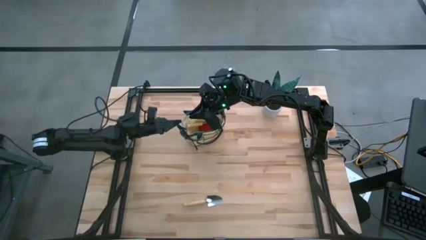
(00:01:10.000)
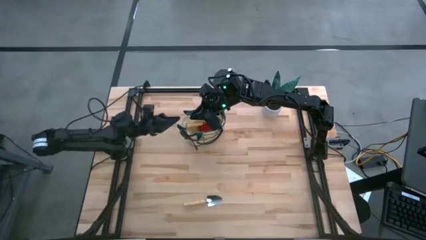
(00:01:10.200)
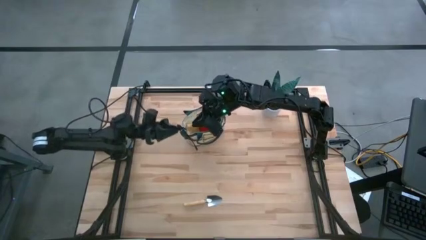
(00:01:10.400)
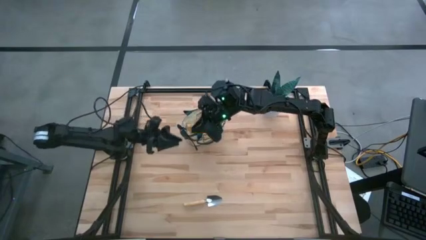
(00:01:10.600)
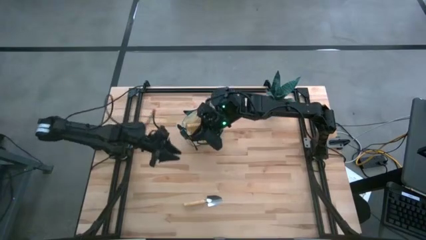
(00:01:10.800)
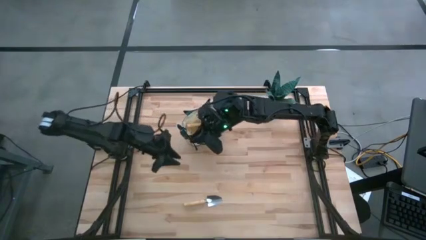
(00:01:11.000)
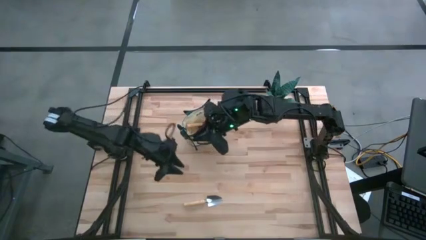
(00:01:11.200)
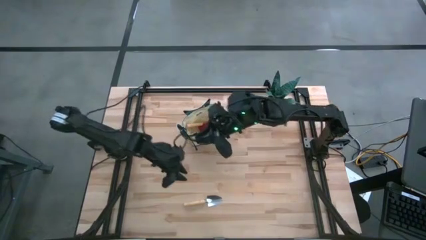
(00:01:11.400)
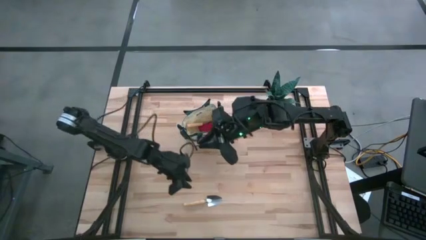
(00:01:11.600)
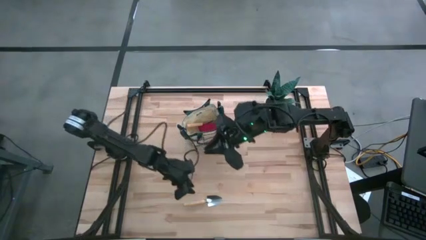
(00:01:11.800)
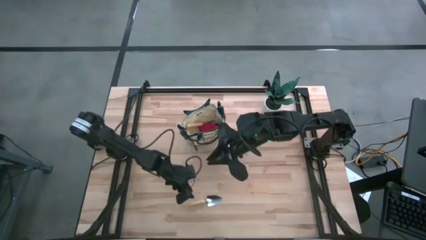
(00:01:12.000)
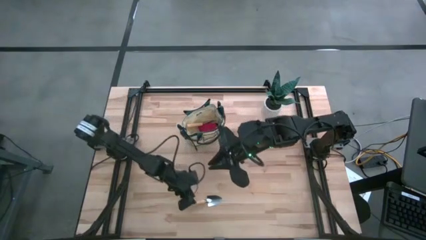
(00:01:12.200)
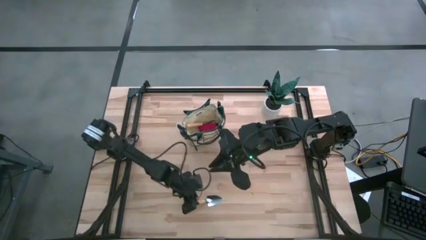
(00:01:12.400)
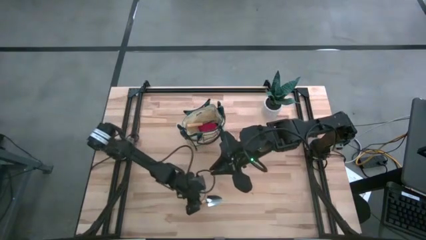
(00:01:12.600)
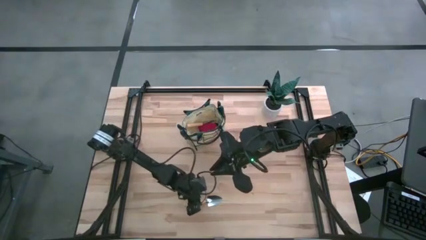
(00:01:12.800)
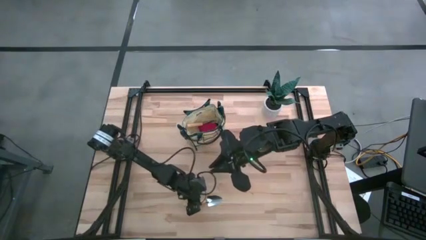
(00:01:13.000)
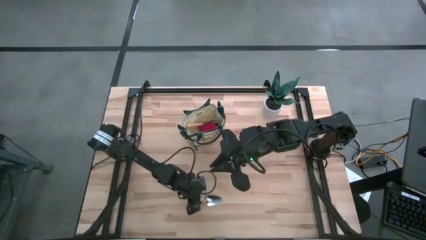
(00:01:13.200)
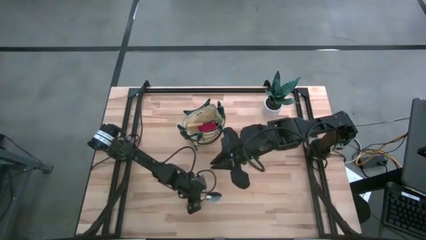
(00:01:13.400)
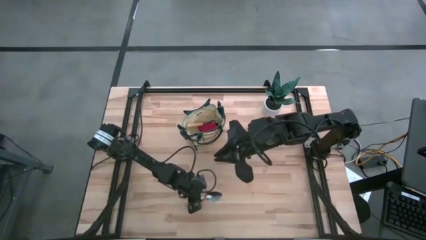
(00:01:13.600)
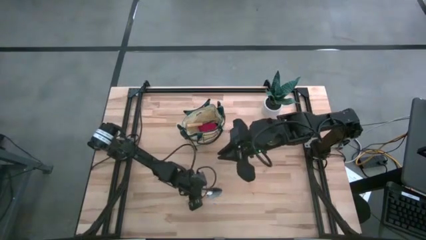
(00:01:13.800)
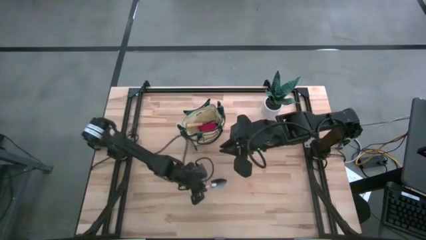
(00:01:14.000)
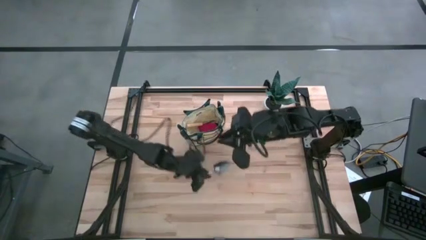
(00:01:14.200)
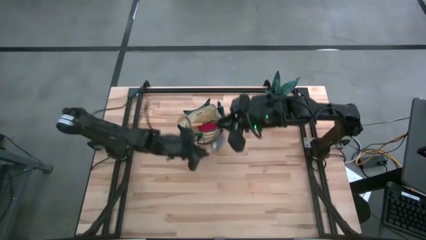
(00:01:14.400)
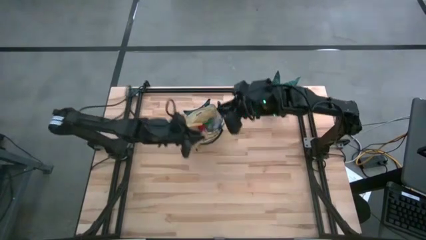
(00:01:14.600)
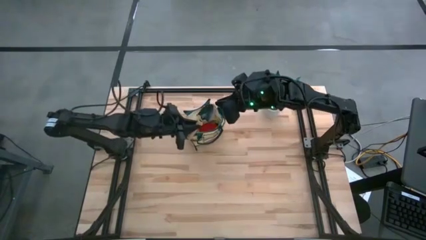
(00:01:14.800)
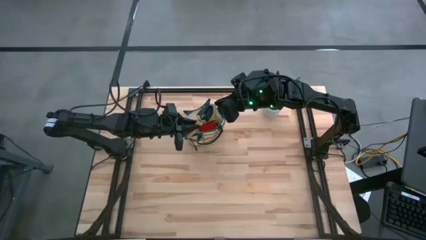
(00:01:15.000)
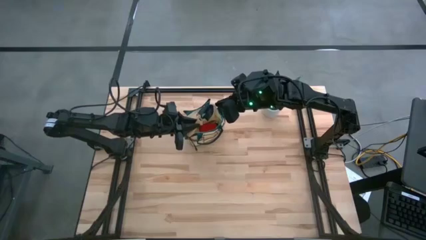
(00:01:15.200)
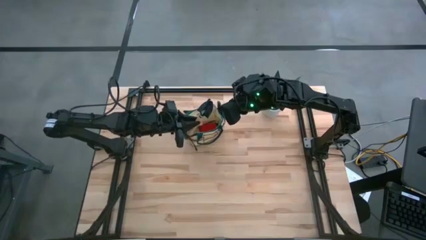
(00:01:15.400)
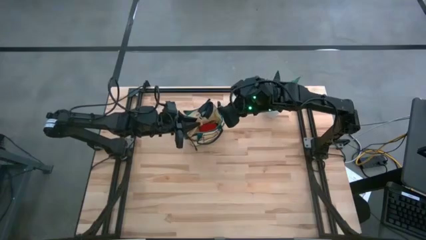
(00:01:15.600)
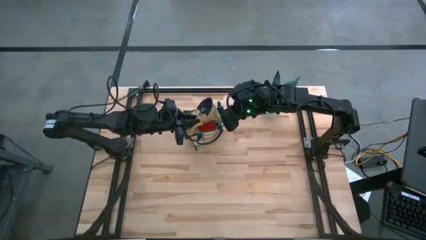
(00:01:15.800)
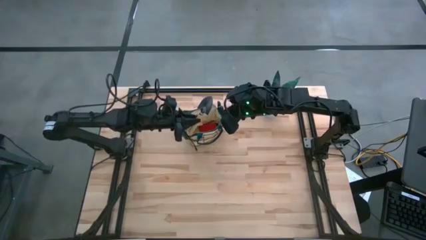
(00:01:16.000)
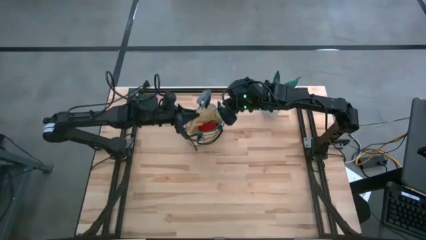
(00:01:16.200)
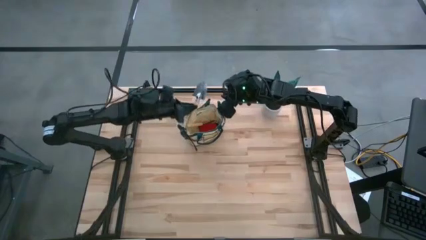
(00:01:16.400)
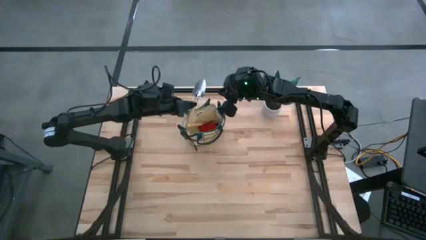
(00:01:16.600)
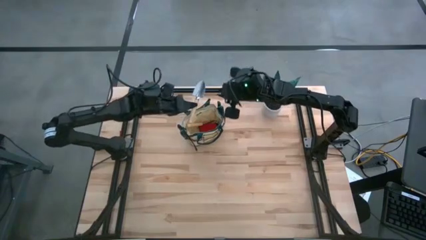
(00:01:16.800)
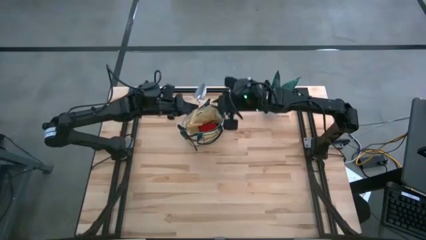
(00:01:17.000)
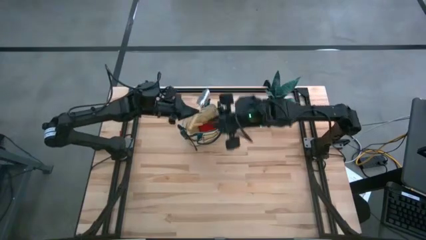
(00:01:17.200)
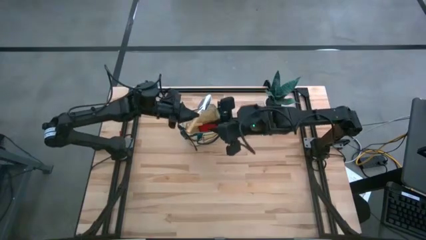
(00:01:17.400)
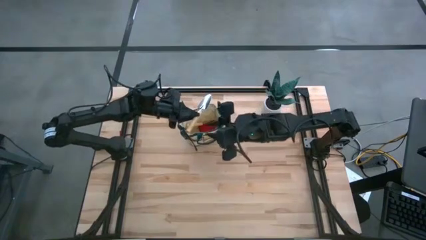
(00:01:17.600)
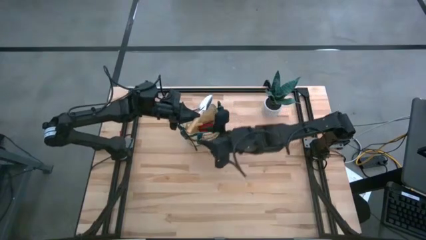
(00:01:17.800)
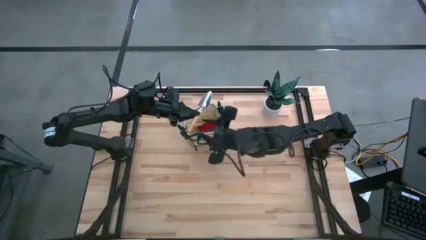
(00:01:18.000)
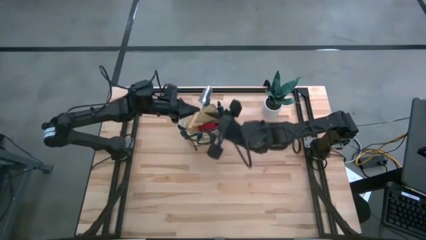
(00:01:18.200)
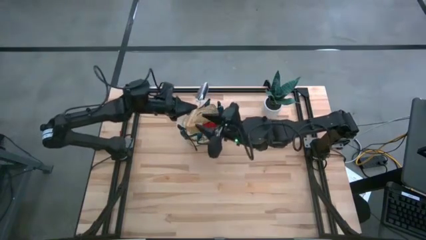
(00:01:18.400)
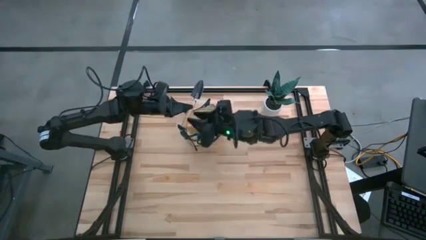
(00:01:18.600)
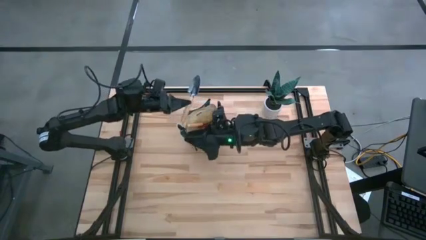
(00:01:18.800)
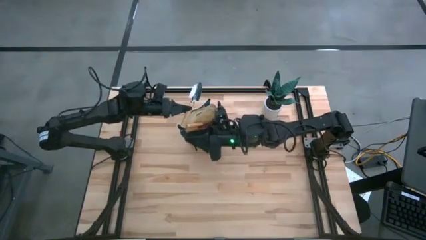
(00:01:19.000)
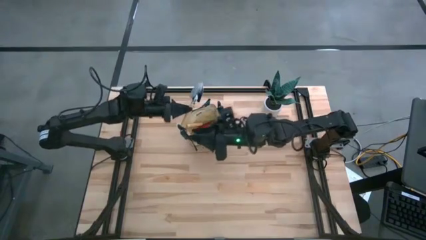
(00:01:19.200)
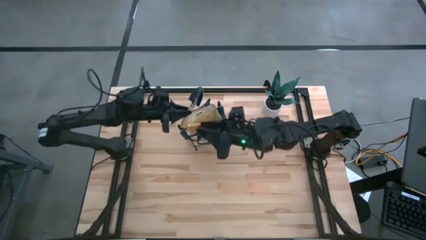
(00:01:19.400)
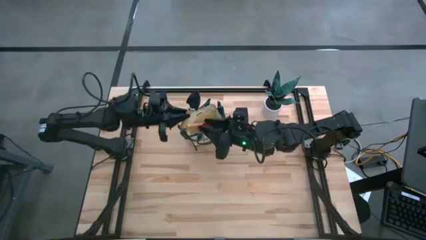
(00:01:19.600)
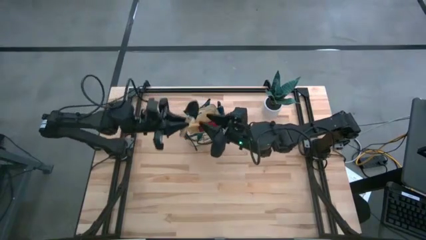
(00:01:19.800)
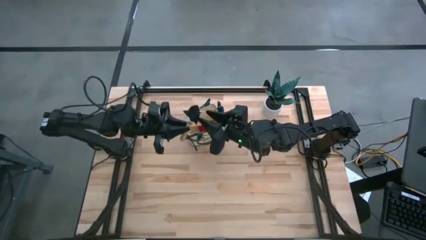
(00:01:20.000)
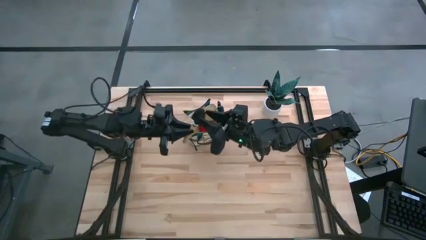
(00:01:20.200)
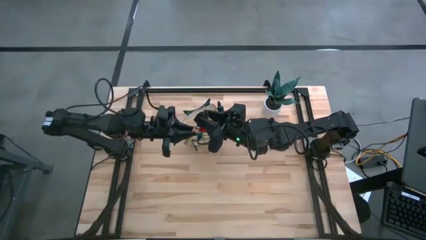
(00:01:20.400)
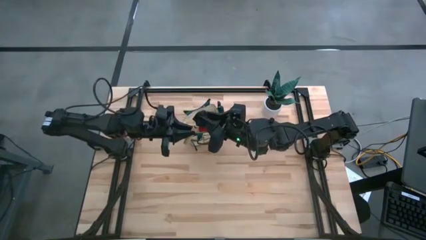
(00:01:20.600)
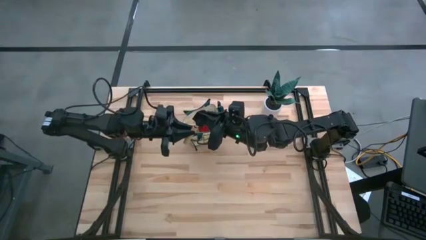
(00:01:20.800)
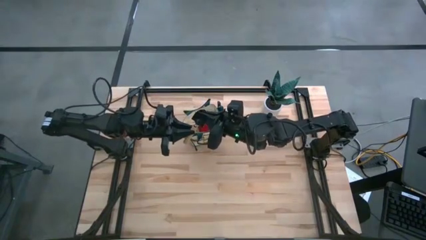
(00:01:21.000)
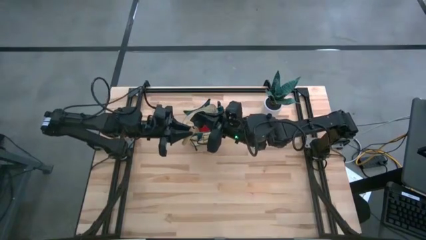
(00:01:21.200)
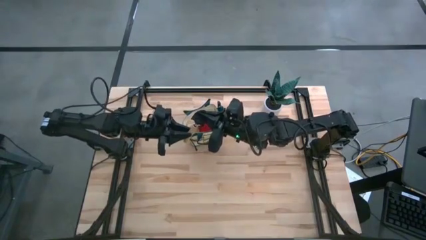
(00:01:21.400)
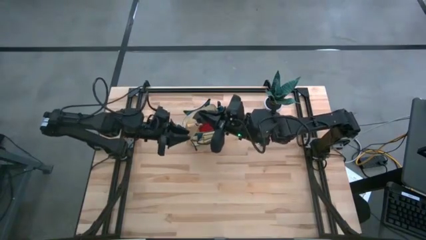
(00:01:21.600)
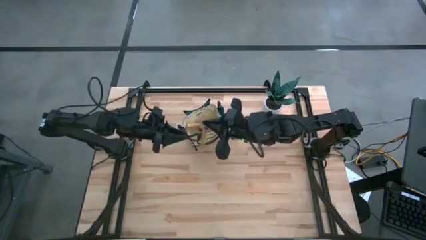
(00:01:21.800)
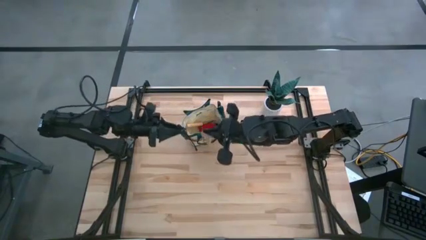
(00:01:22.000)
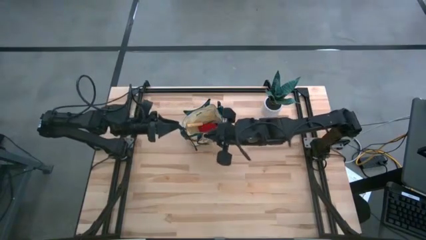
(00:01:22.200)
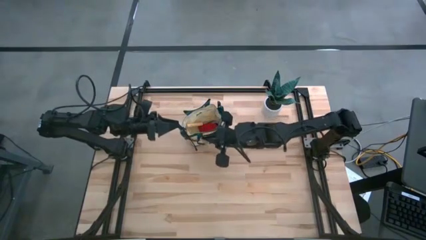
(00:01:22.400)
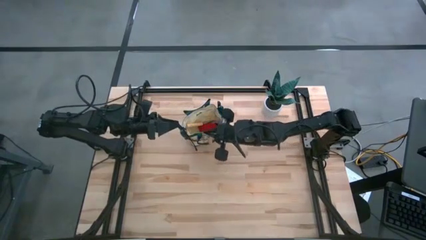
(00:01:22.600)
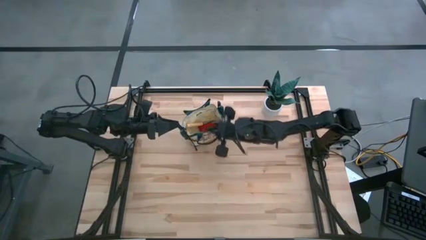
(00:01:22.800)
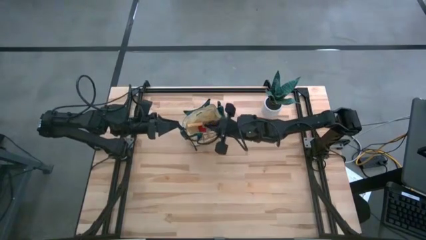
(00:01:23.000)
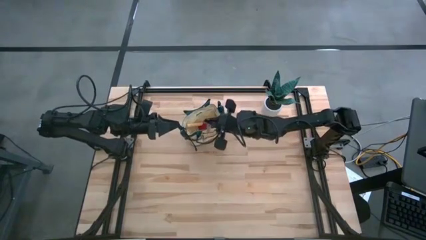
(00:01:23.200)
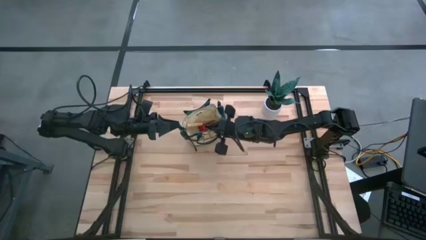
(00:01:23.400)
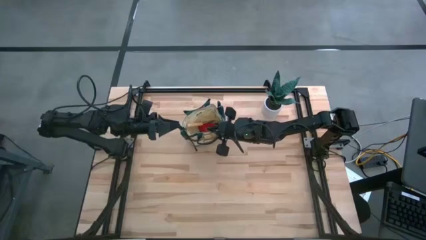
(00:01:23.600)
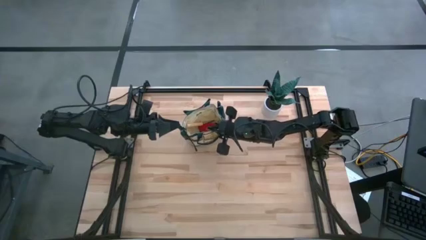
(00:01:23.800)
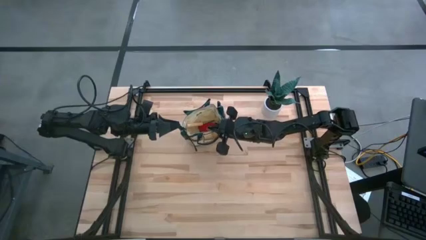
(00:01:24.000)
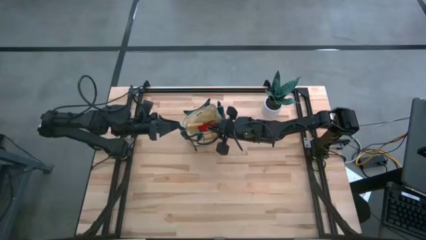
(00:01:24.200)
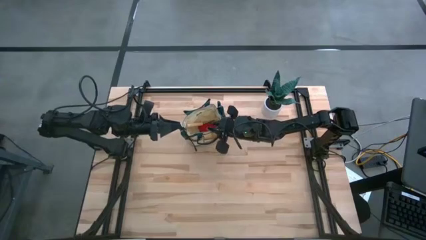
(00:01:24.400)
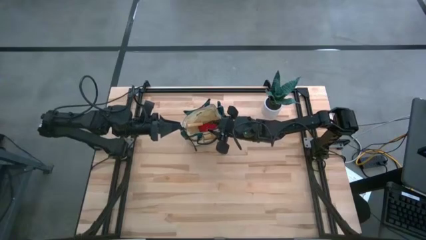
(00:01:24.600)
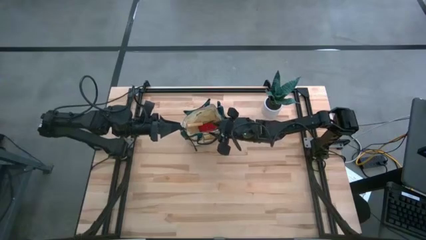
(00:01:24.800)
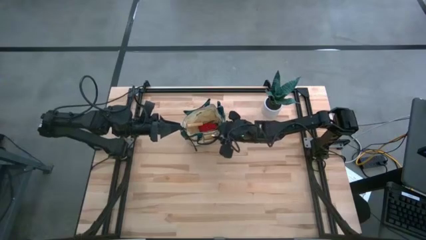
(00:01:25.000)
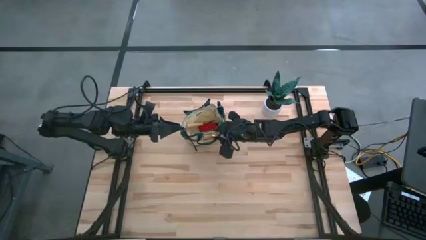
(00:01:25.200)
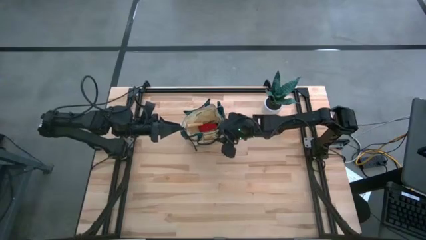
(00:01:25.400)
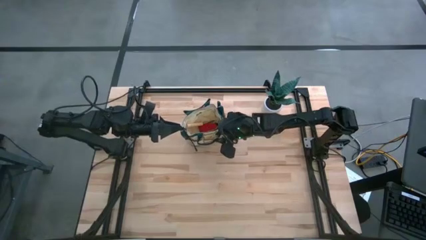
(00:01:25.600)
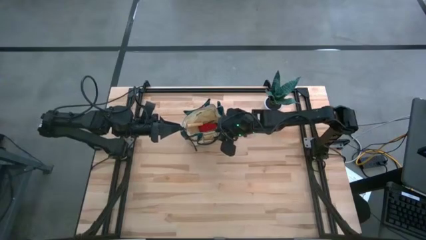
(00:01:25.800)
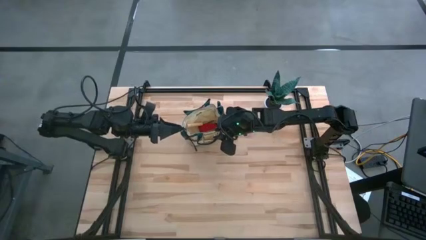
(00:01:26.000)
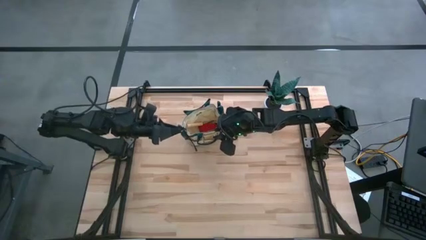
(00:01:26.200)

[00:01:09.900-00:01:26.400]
Task: Pick & Place Garden tools in Gardening bag
Put the trowel into the gardening bag
